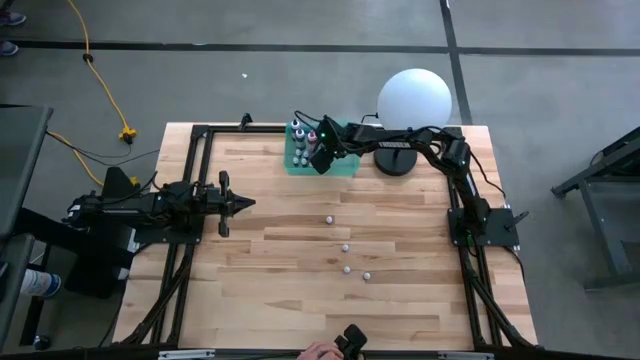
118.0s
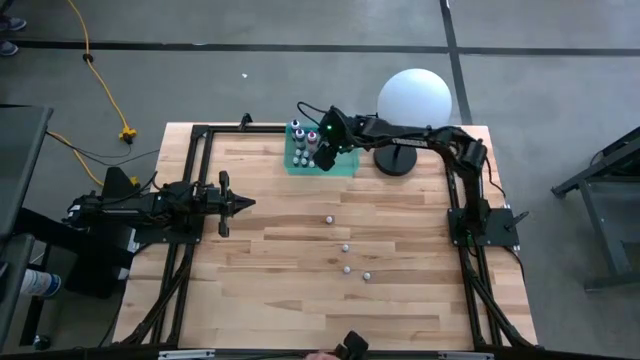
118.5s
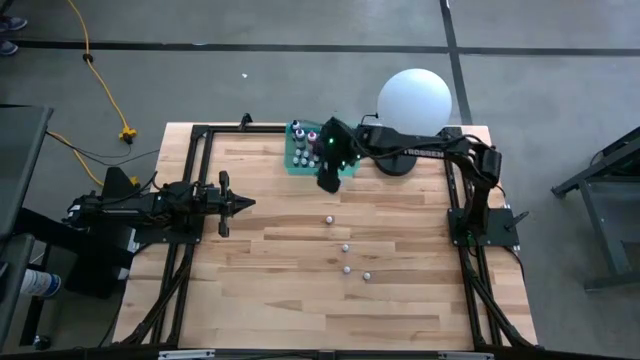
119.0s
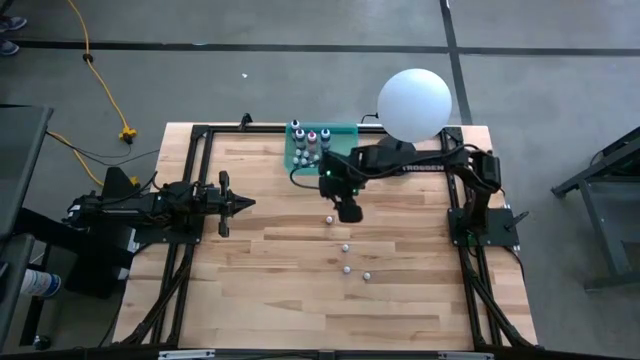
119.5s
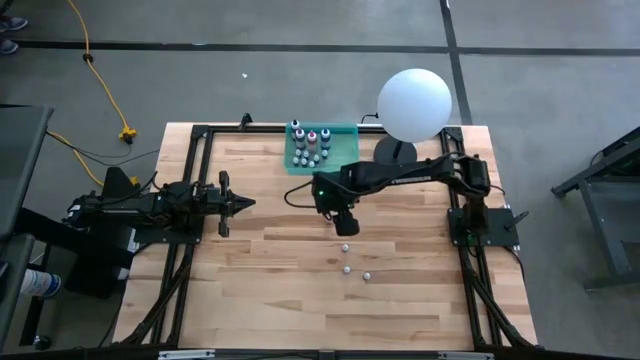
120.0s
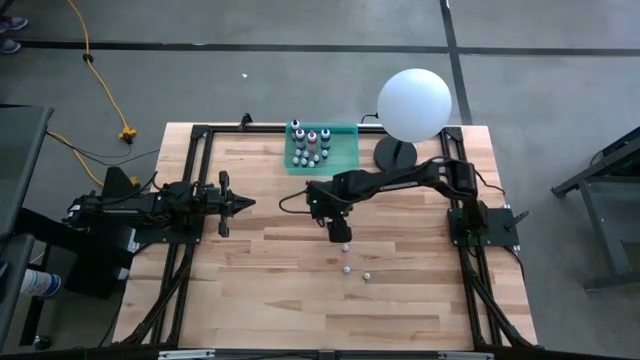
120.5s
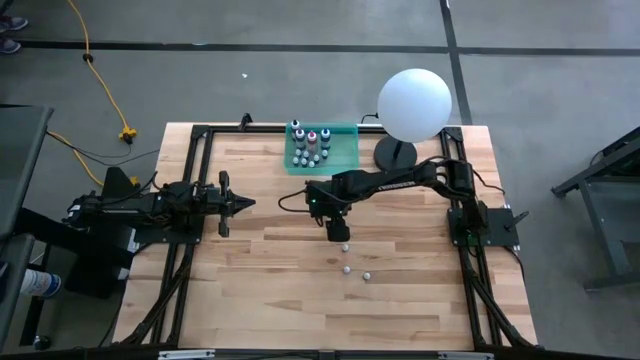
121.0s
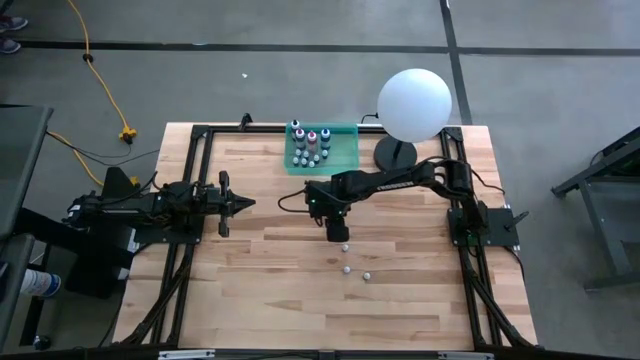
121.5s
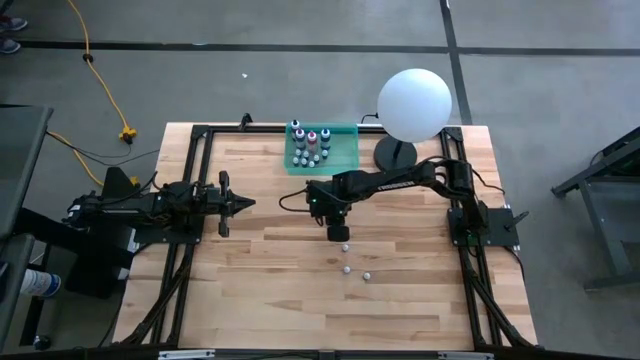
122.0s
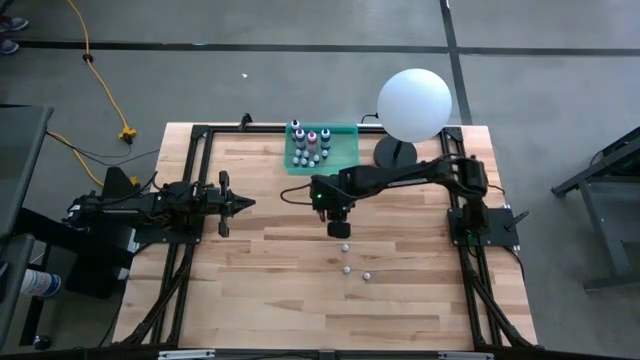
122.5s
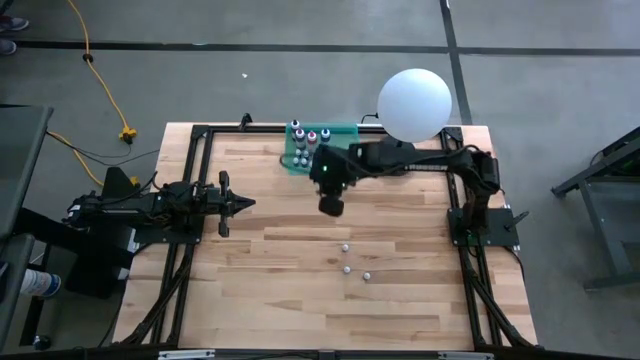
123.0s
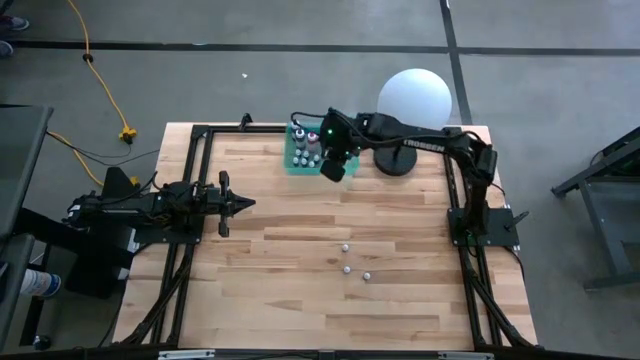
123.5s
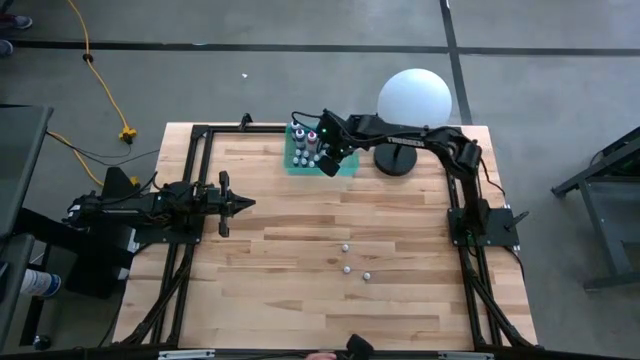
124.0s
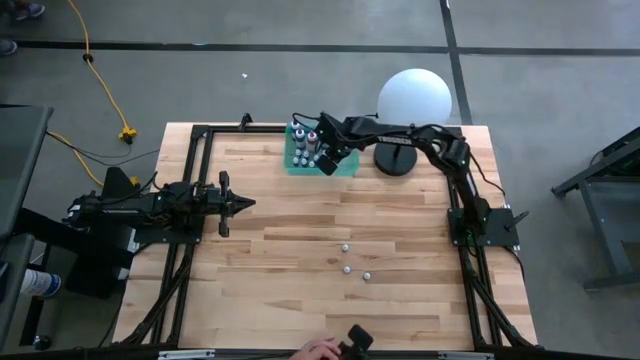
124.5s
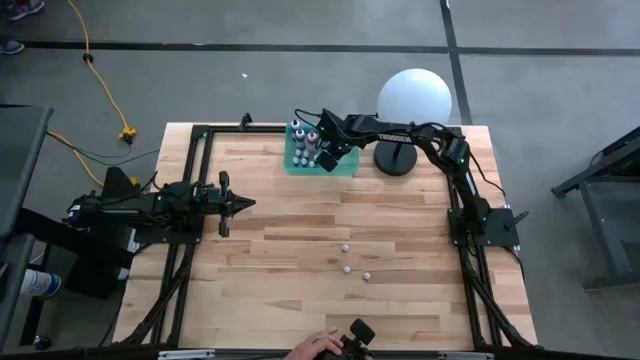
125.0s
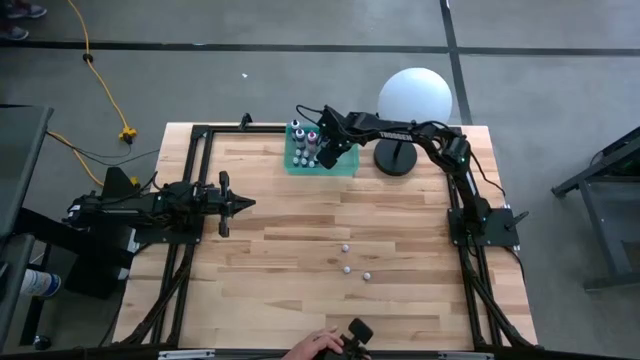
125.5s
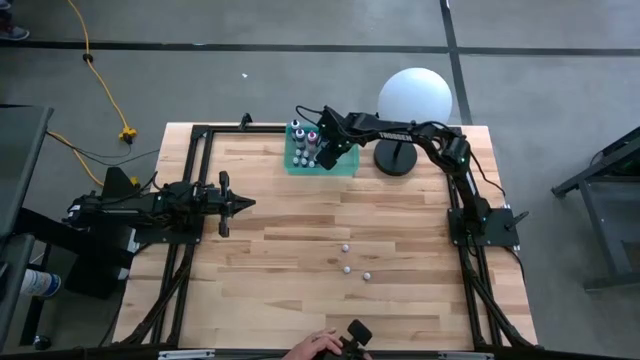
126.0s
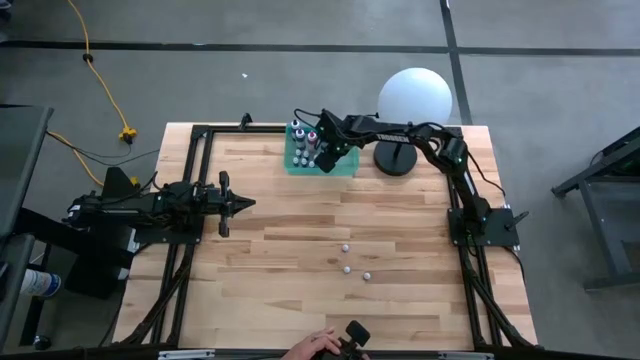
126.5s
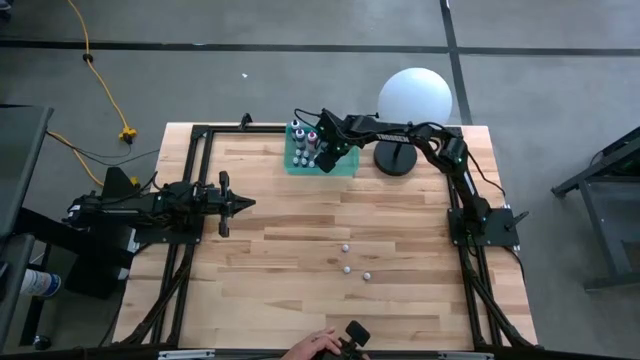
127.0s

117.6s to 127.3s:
Task: Pick & Place food coloring
Put the small orange food coloring bottle into the bin

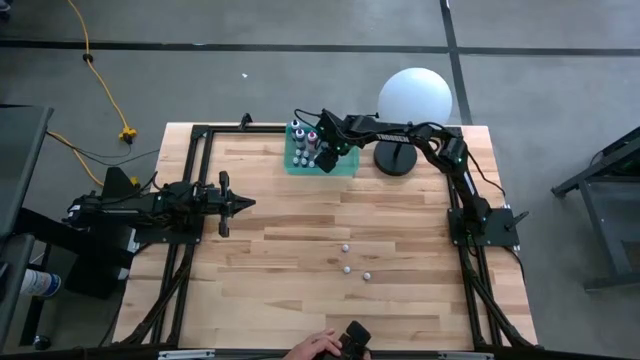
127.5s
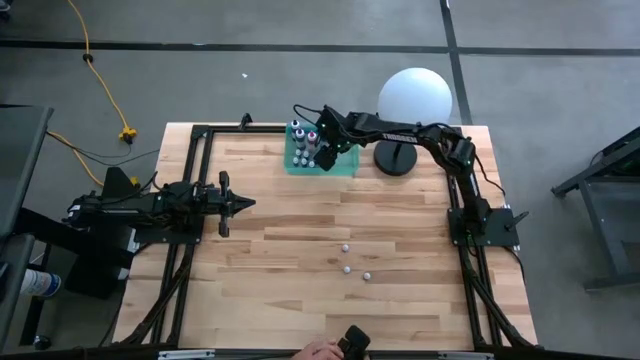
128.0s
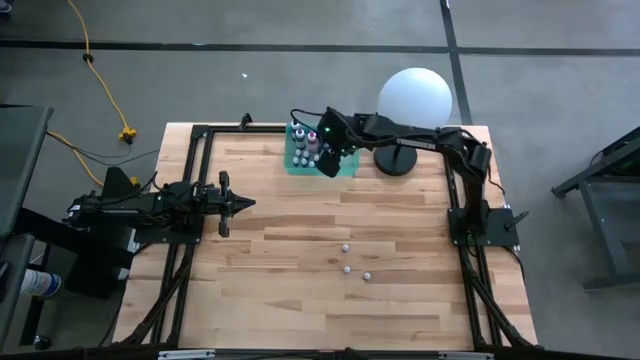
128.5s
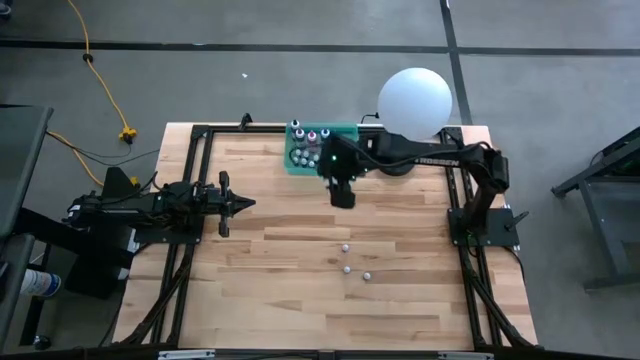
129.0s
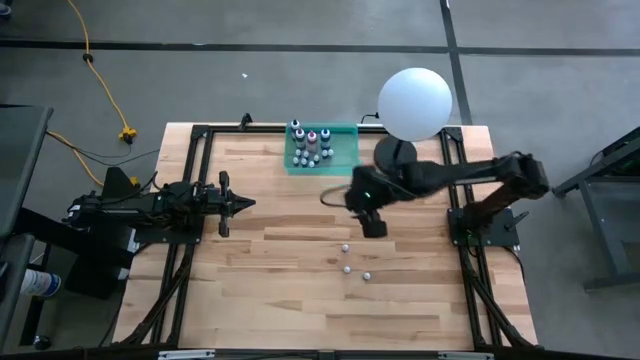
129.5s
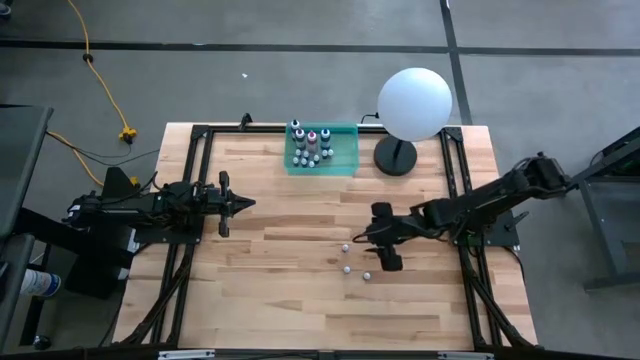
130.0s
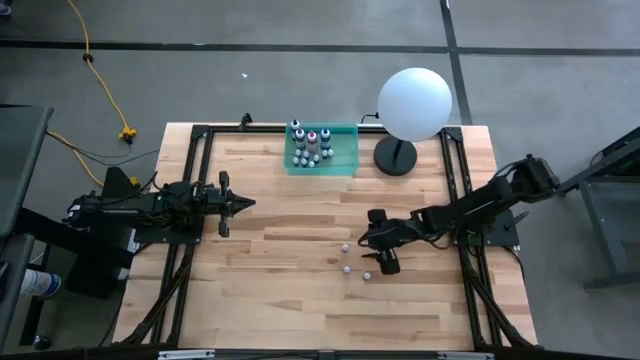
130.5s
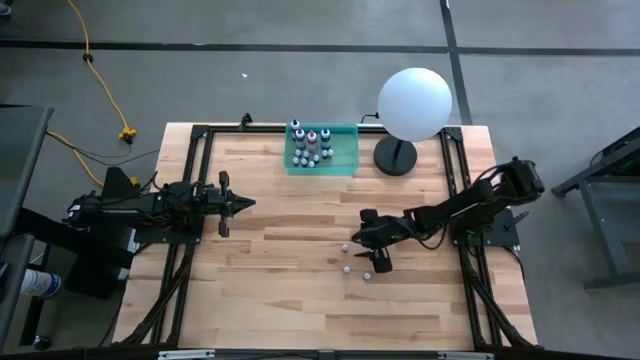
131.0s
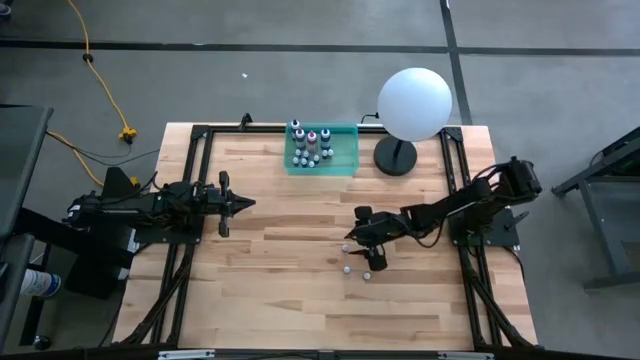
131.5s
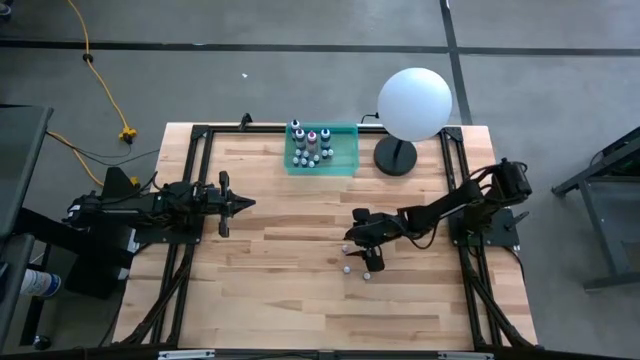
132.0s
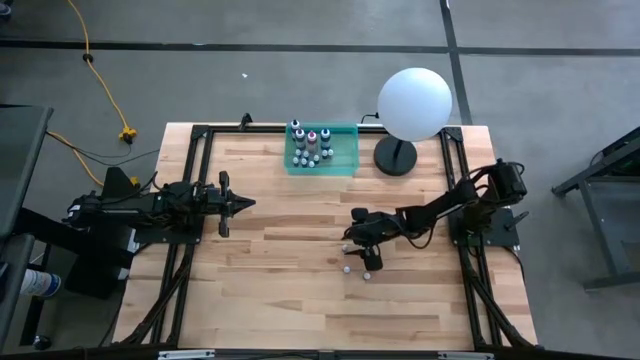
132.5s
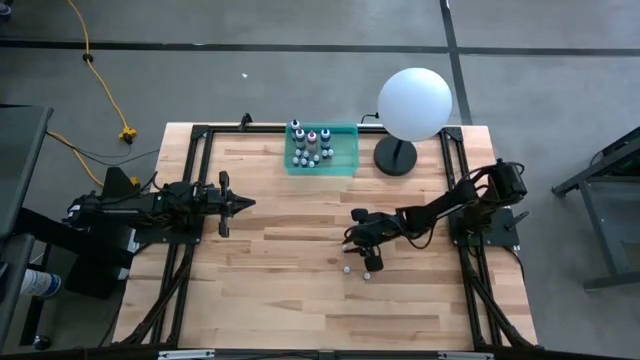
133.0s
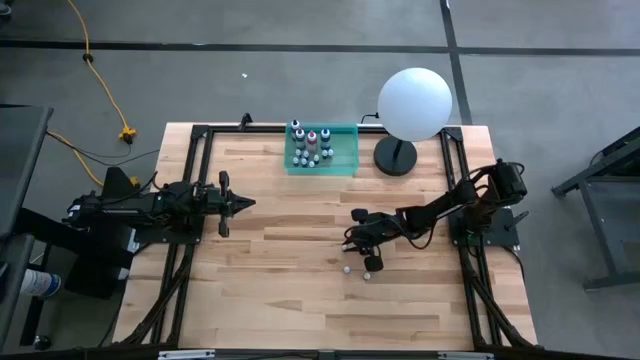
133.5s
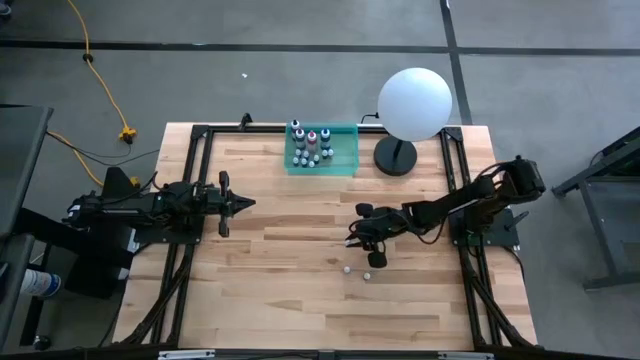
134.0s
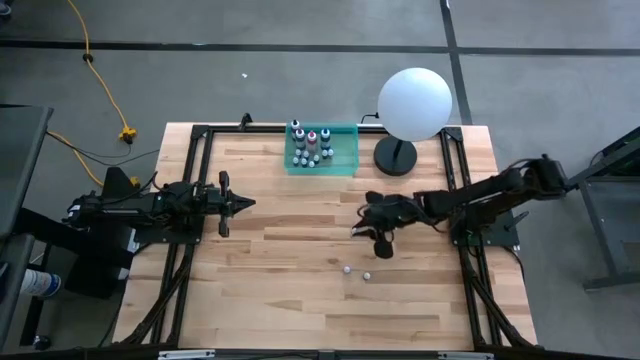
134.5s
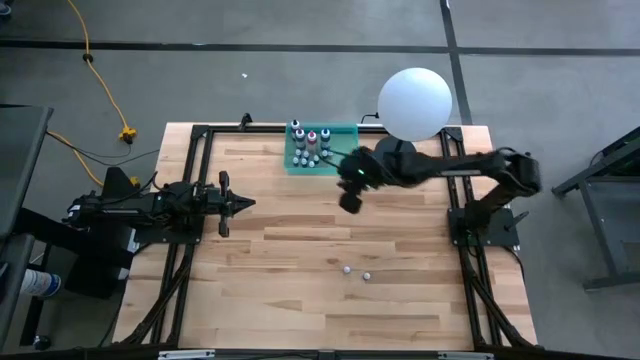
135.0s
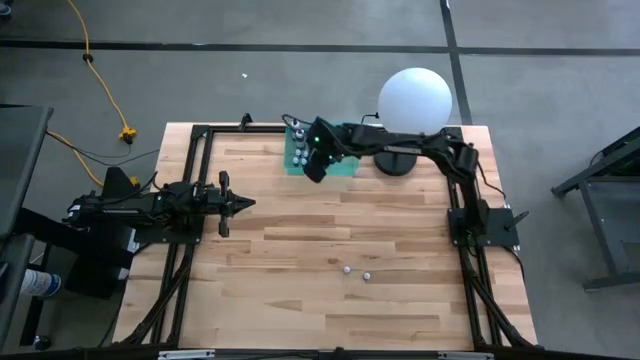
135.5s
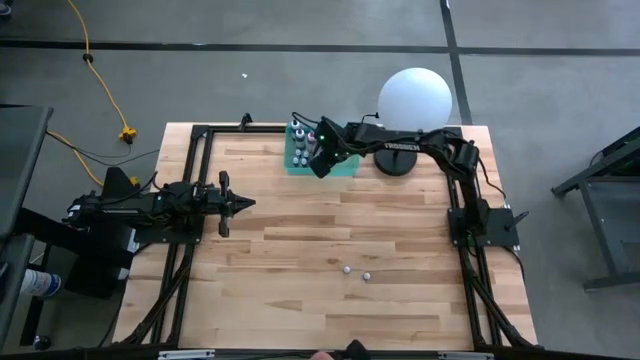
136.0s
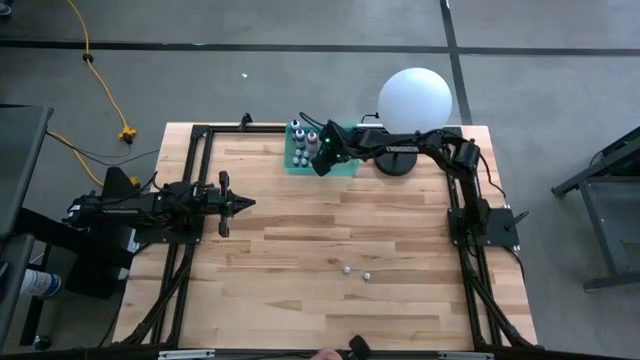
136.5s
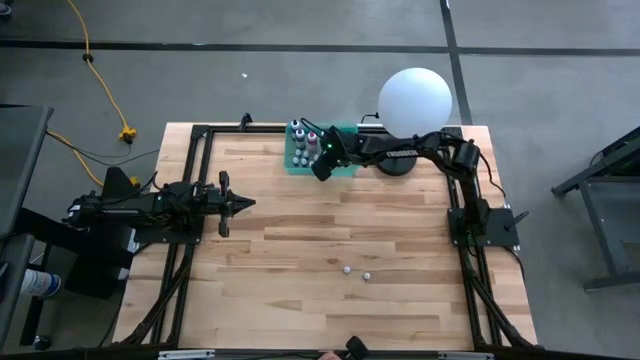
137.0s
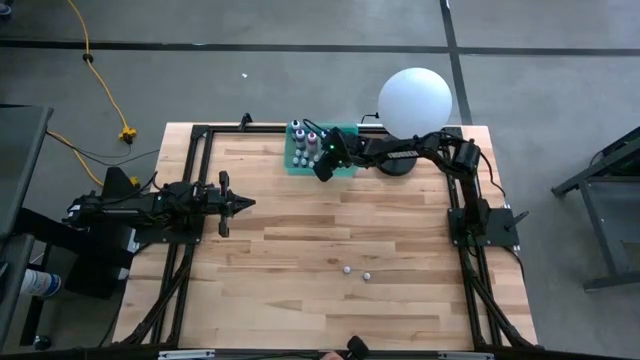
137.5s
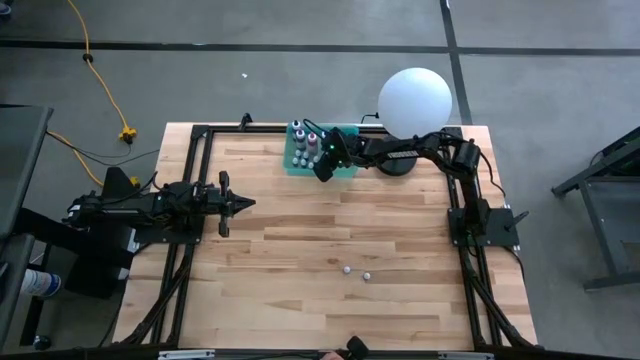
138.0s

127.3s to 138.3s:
Put the small black food coloring bottle into the bin

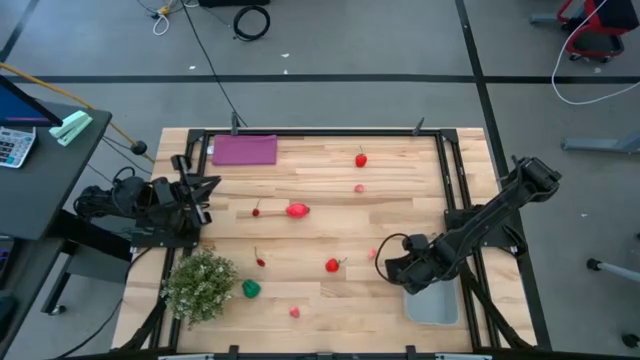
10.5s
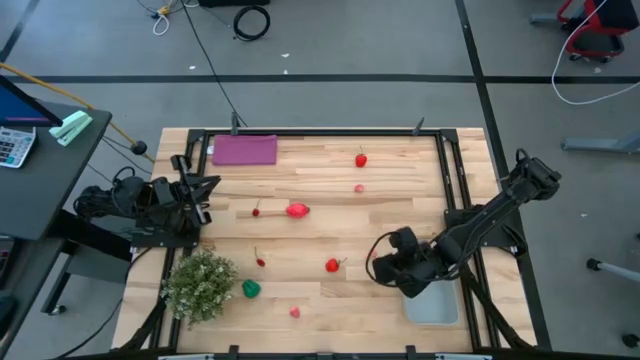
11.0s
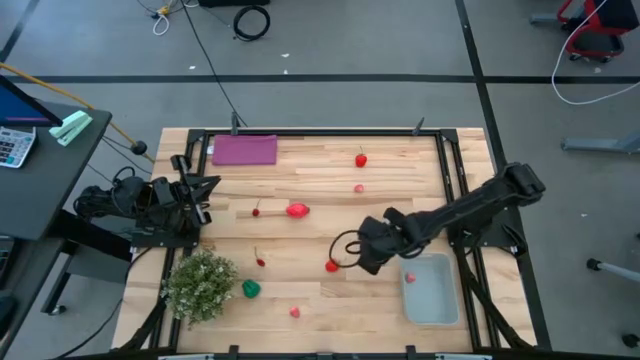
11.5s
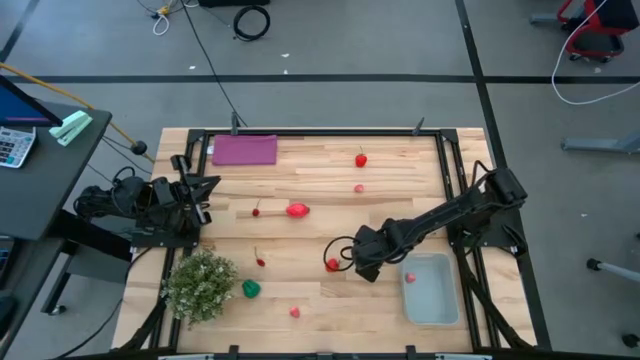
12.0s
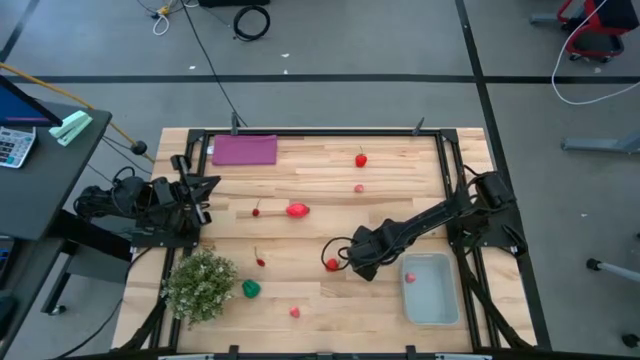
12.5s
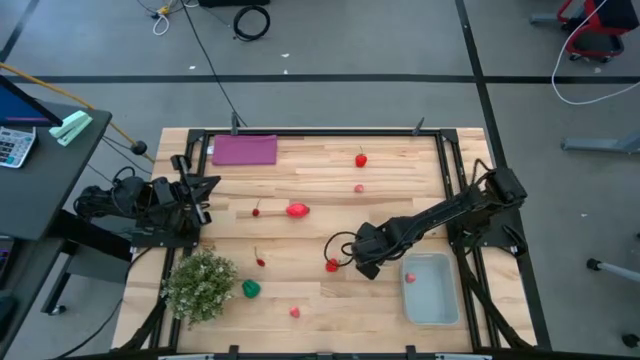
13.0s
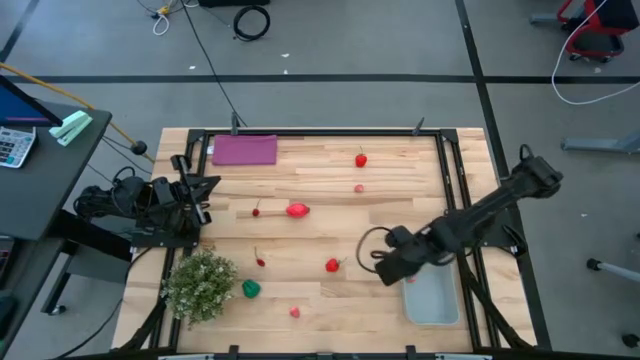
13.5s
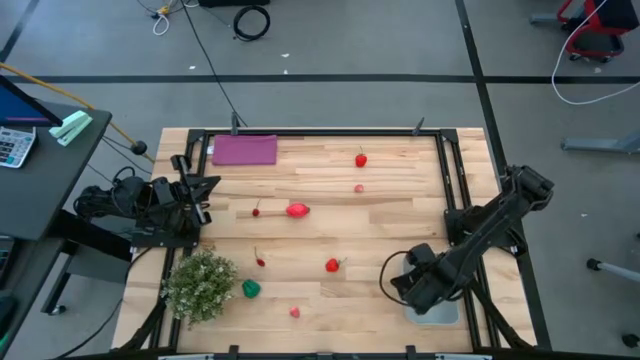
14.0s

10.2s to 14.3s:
Task: Pick and placing Produce into tupperware
Put the pink peach into the gray bin
